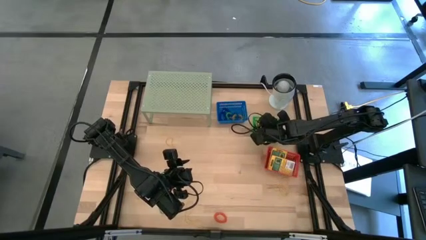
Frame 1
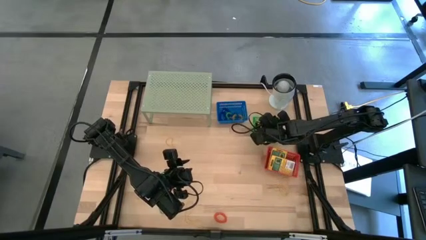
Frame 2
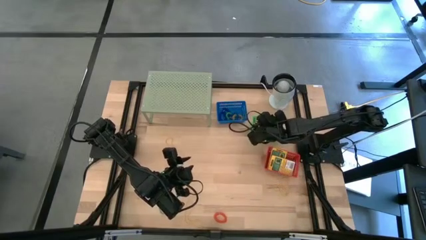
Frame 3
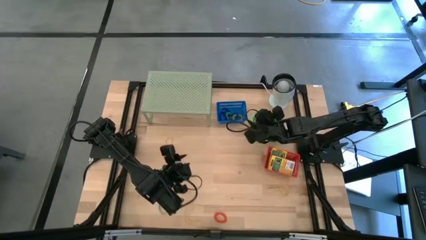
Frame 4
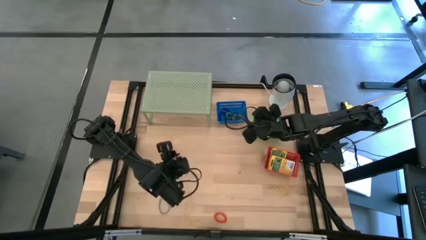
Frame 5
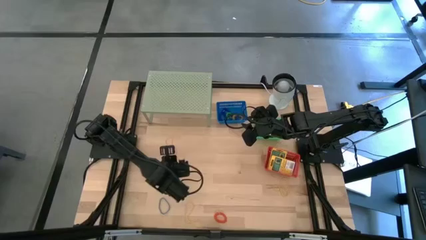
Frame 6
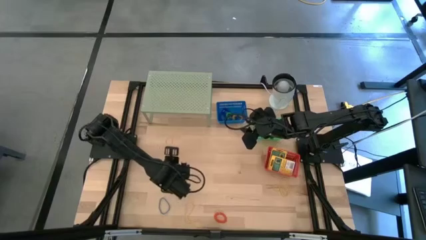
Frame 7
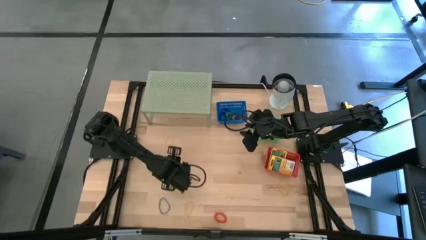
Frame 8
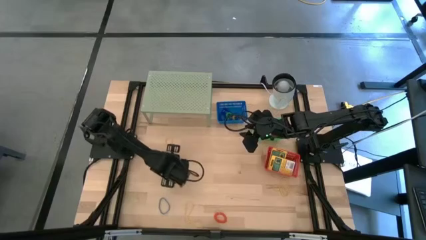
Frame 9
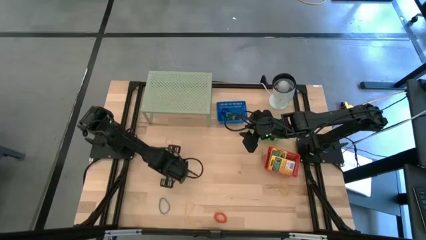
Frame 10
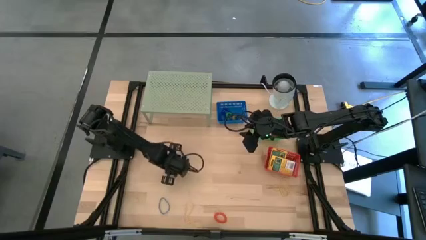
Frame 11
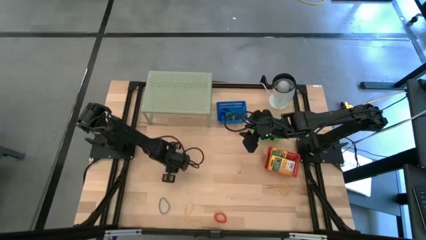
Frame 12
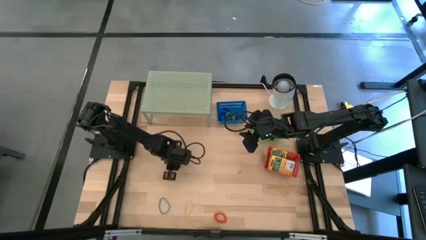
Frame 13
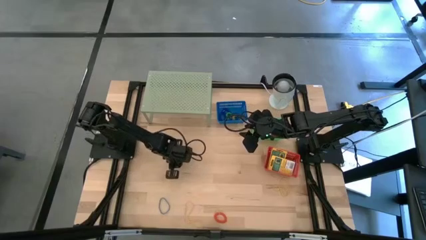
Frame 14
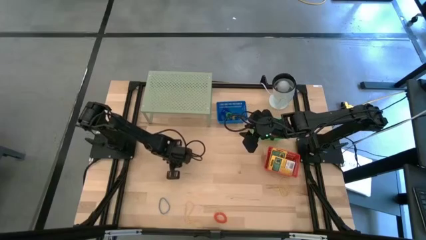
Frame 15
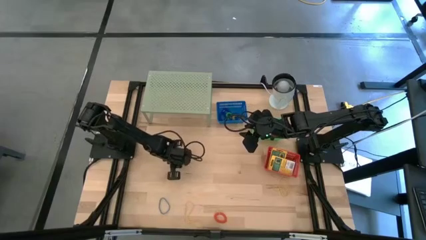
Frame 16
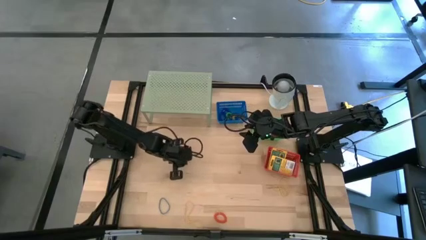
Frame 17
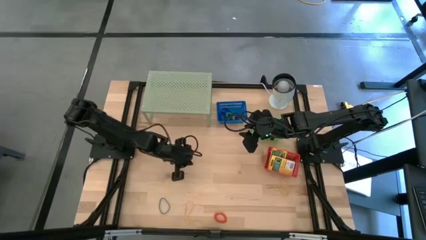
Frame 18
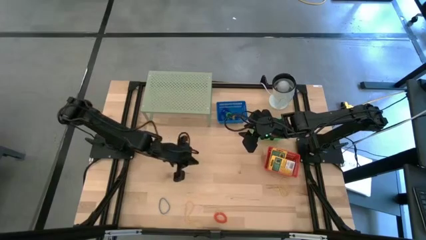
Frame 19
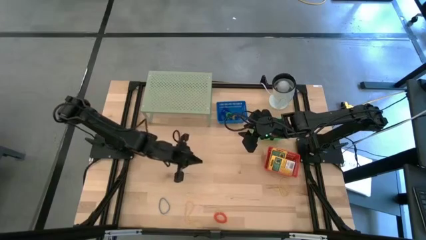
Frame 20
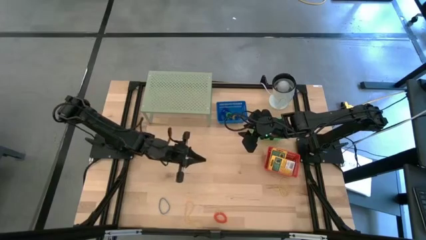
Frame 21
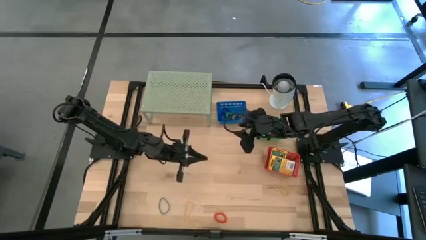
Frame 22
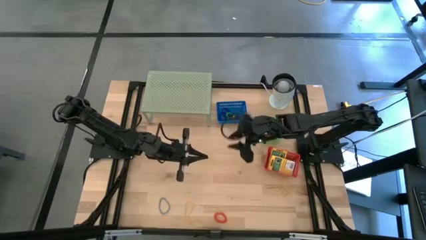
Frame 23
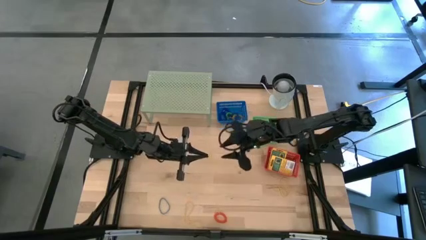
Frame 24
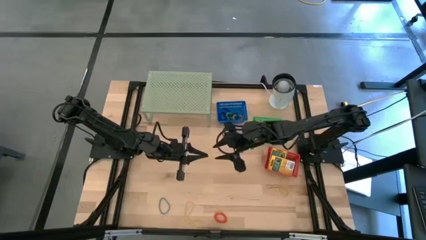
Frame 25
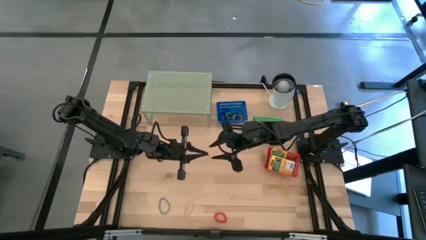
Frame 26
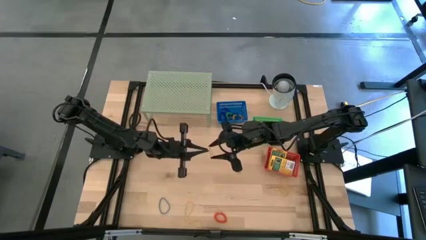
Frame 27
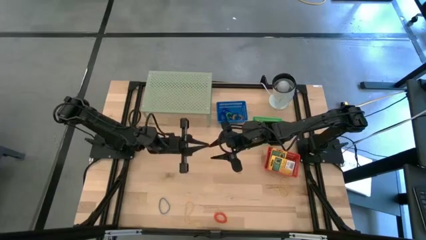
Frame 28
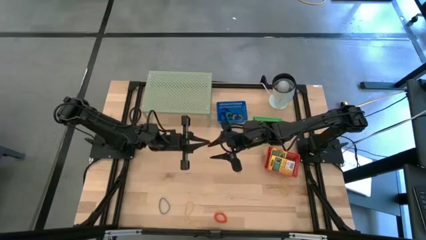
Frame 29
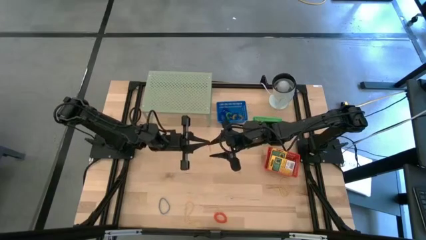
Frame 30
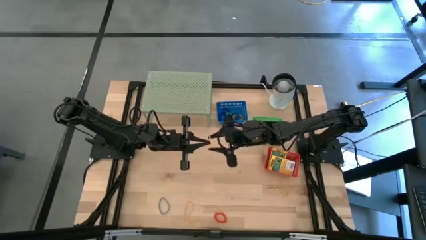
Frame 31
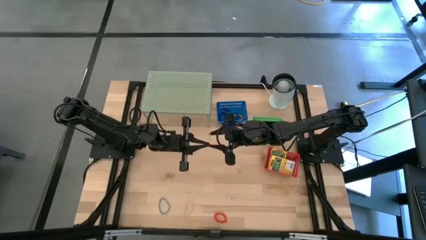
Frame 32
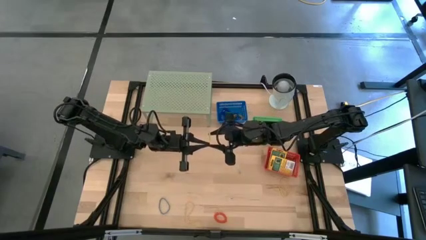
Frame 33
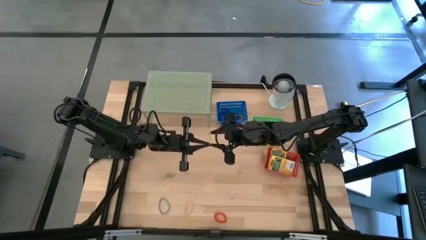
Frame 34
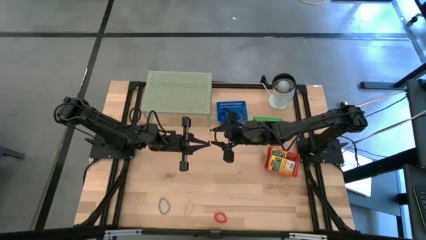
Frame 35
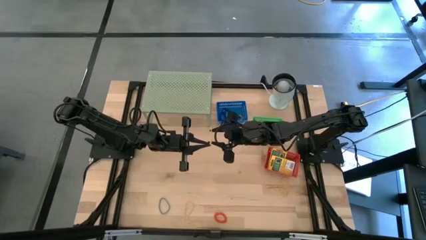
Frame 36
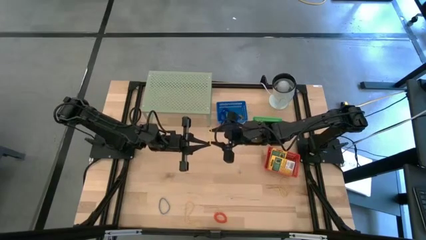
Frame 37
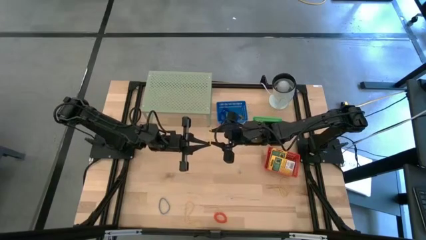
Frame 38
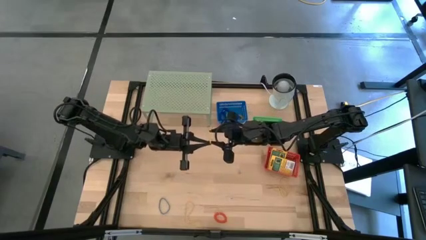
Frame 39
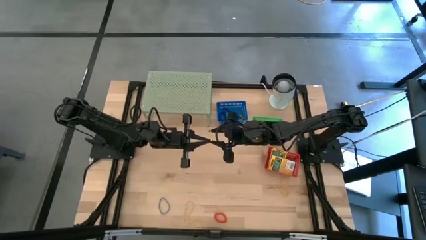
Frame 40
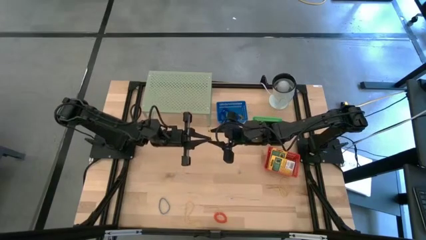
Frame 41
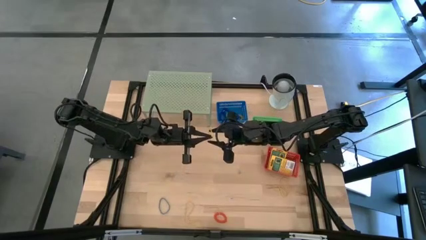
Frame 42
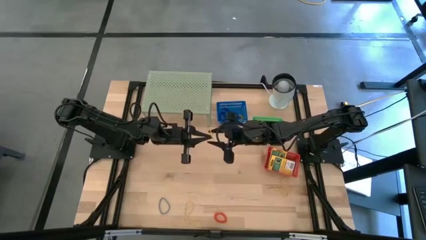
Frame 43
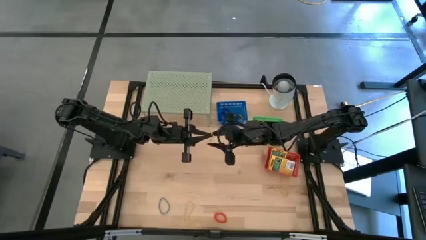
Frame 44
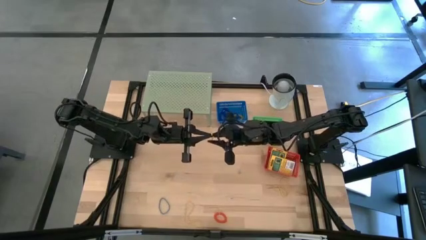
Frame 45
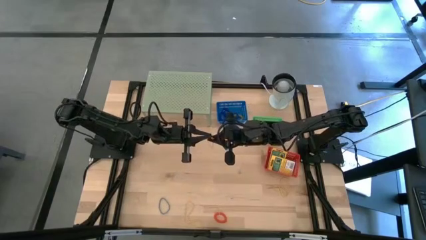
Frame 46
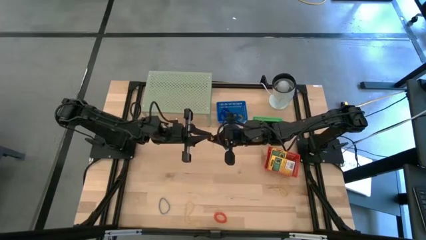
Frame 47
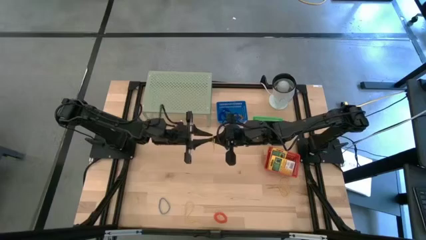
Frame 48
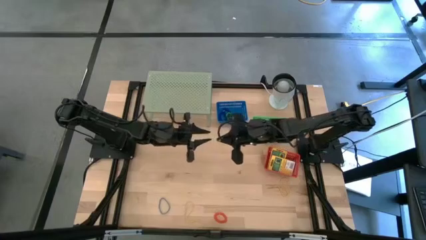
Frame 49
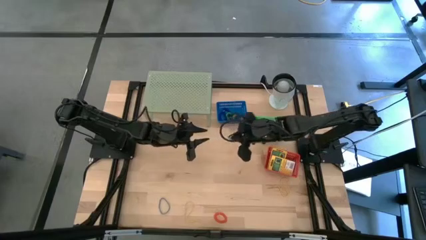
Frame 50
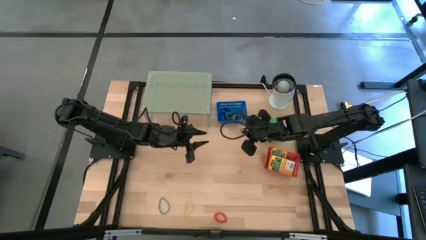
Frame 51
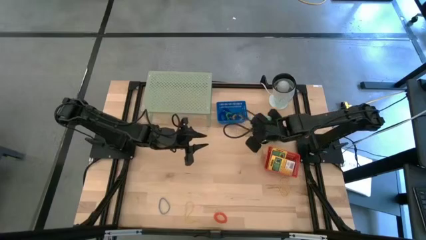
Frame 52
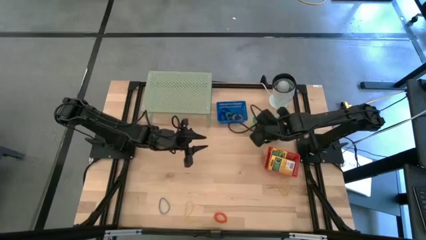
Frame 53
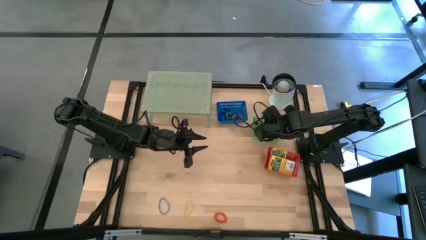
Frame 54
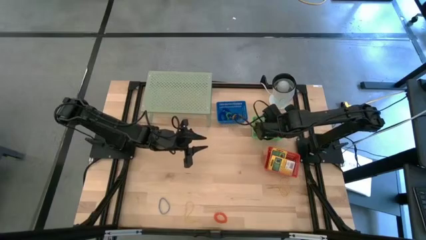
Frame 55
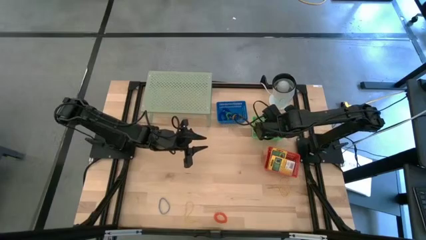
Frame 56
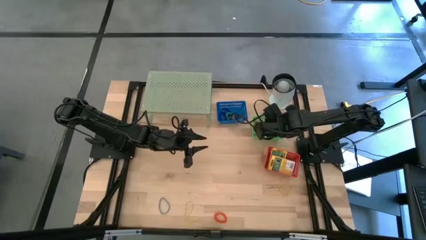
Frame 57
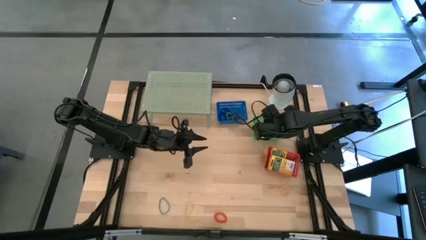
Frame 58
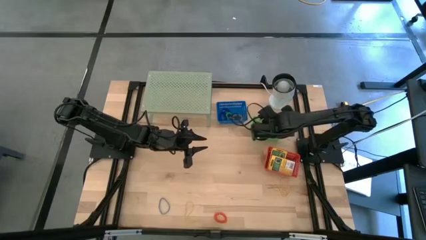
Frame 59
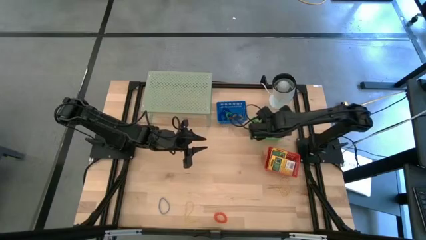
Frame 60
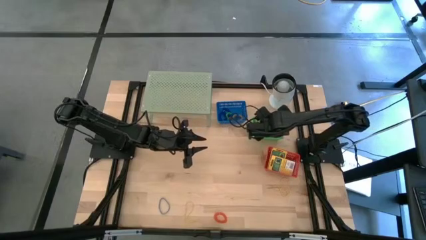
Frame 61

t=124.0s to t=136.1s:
Task: Pick & Place Office Desk Supplies
Put the yellow rubber band into the green bin

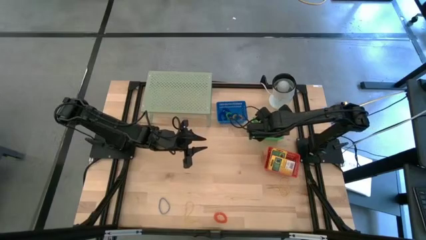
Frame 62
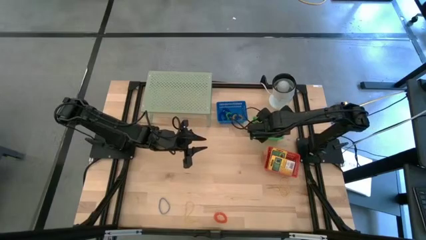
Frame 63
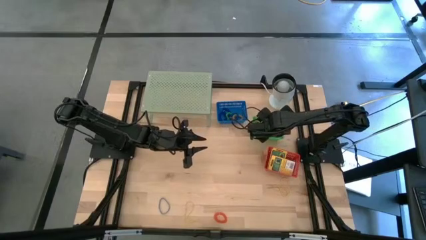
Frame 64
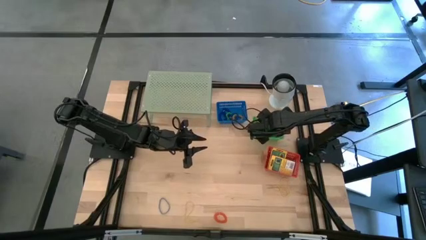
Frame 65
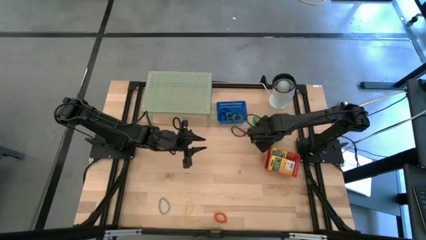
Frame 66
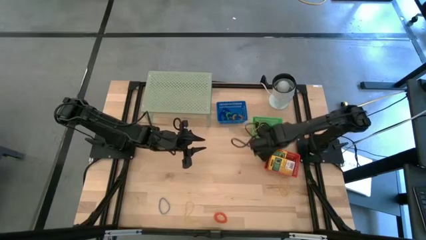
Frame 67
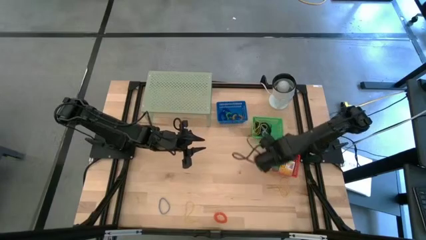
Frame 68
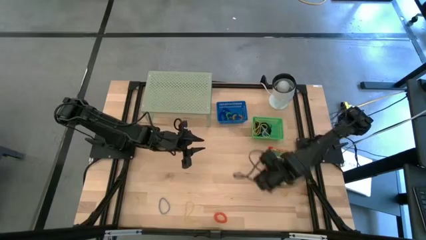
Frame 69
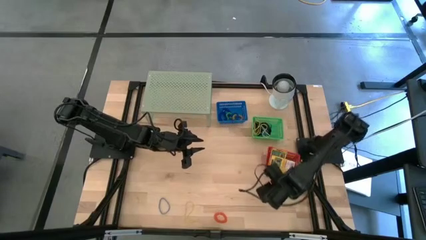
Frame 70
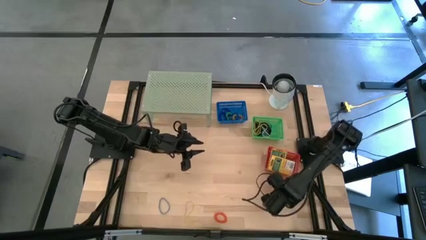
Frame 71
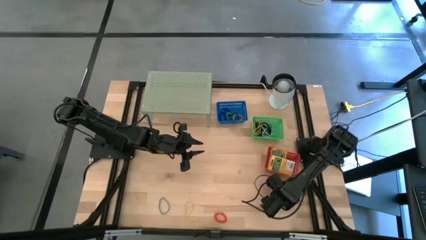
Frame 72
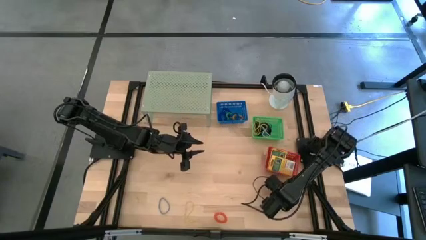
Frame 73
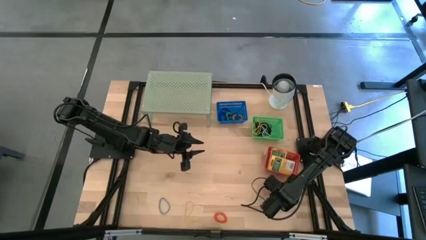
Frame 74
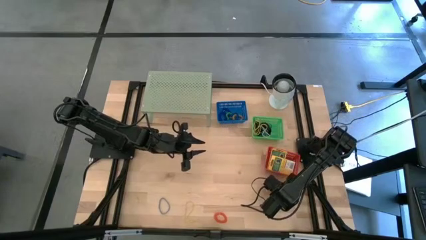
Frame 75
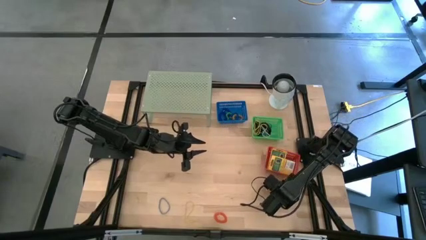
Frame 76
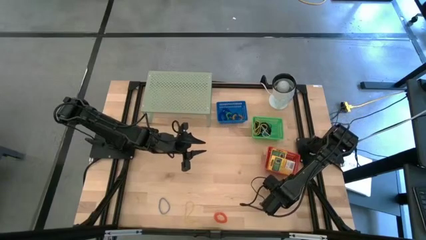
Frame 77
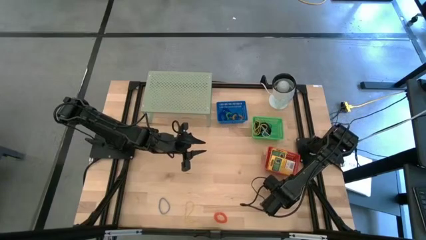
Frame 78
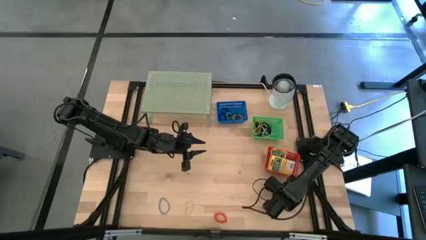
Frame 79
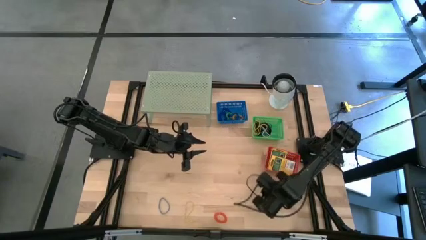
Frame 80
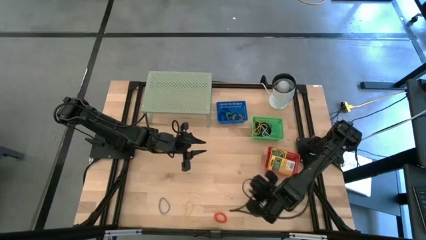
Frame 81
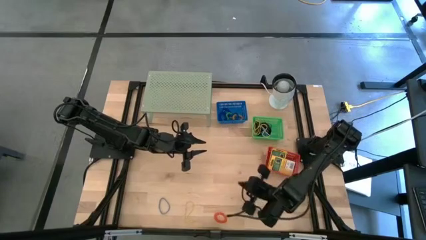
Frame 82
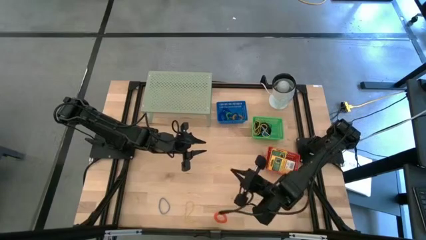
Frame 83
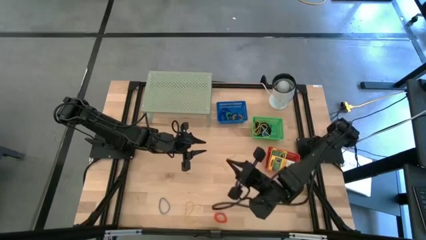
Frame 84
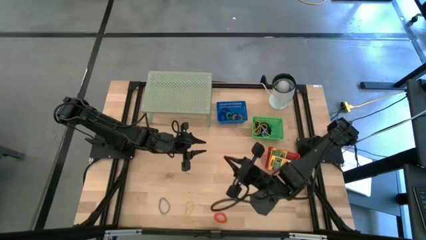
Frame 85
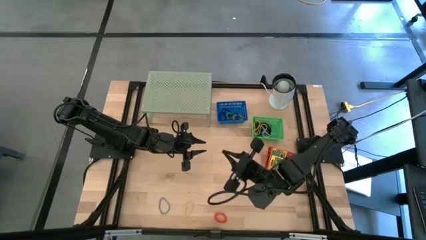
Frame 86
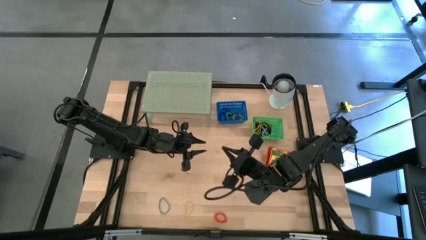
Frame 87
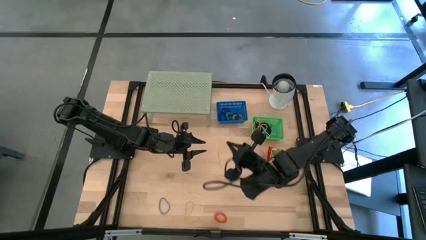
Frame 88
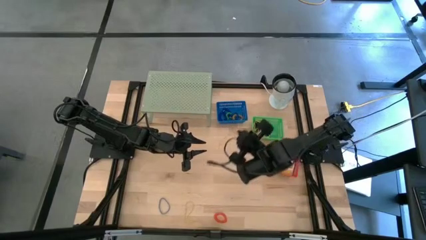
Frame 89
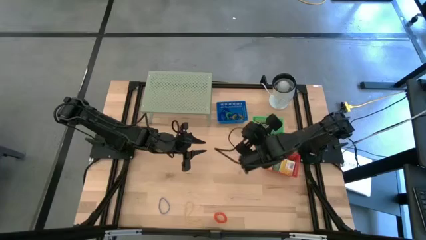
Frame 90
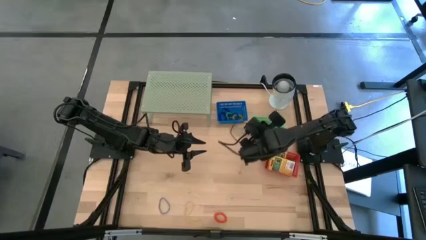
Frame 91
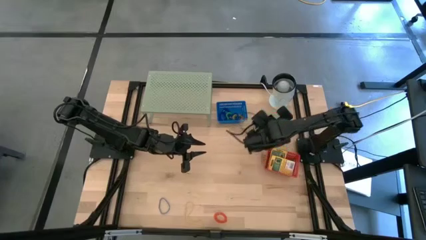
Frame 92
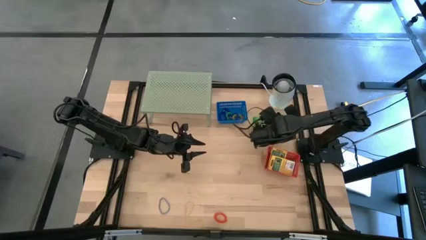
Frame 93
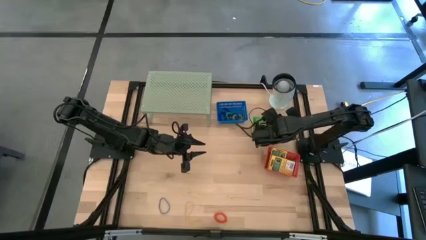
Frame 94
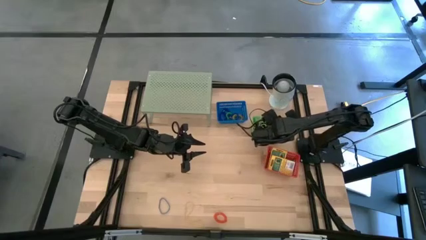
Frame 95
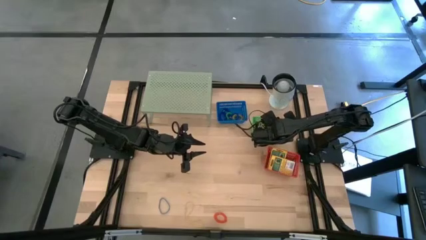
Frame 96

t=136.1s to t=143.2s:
Put the yellow rubber band into the green bin
